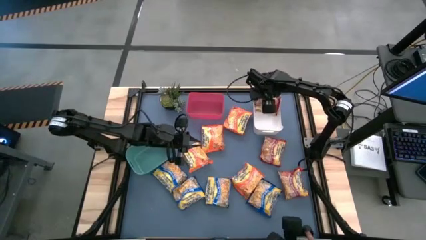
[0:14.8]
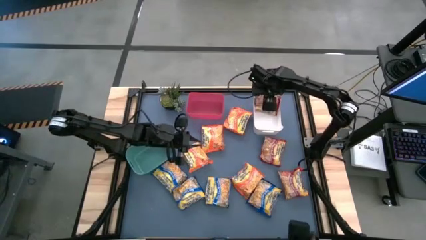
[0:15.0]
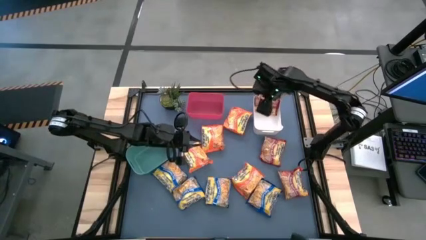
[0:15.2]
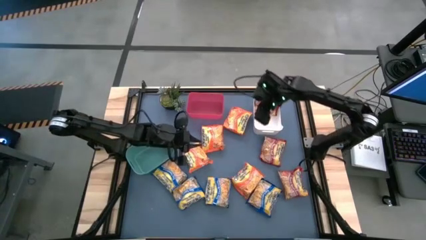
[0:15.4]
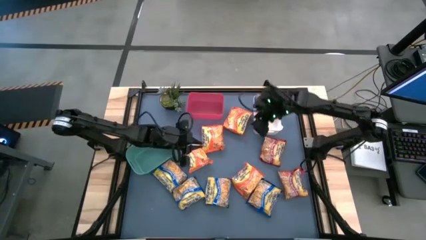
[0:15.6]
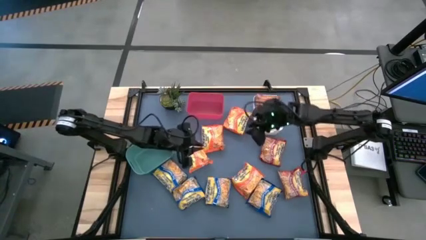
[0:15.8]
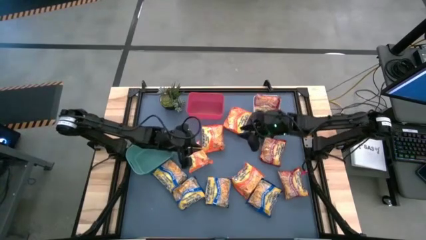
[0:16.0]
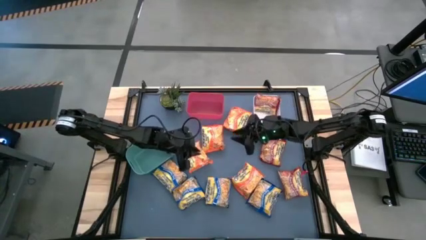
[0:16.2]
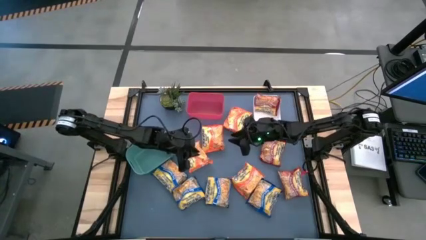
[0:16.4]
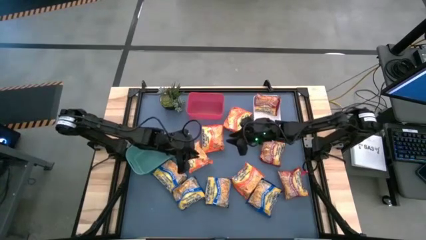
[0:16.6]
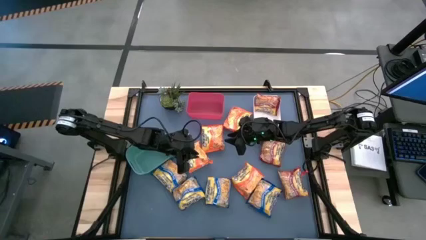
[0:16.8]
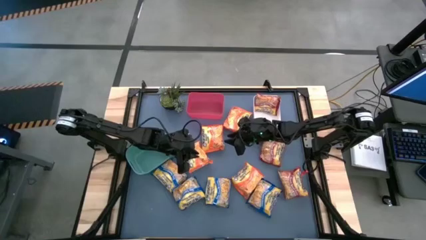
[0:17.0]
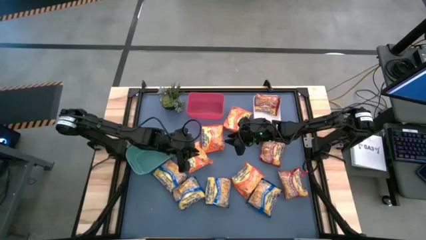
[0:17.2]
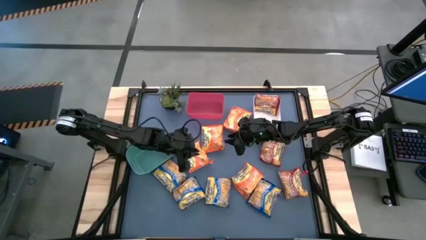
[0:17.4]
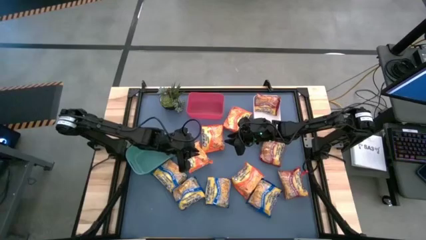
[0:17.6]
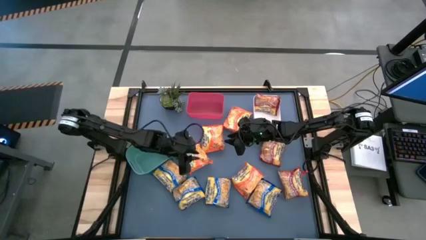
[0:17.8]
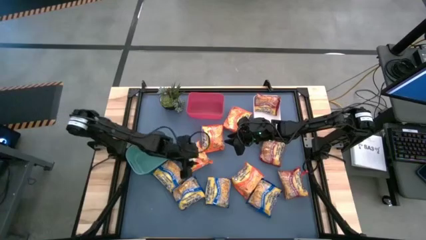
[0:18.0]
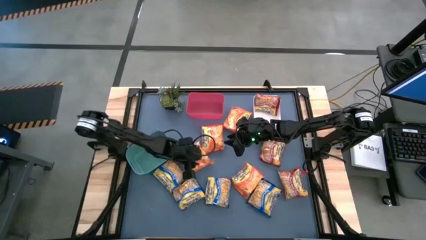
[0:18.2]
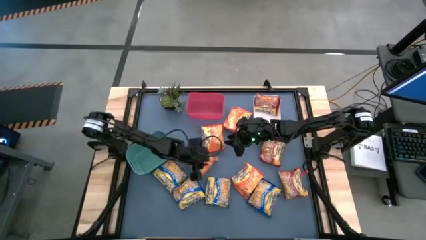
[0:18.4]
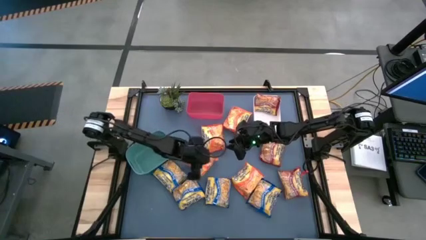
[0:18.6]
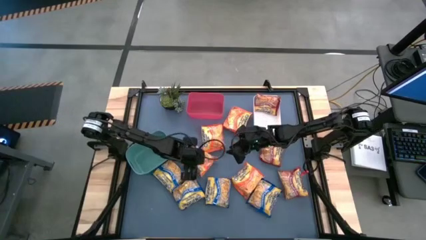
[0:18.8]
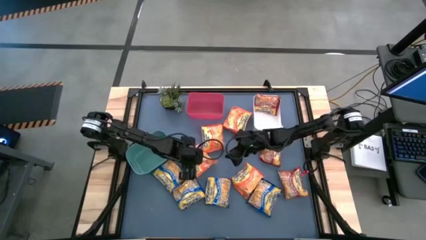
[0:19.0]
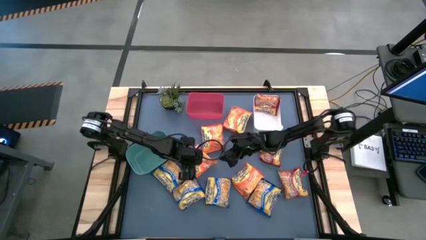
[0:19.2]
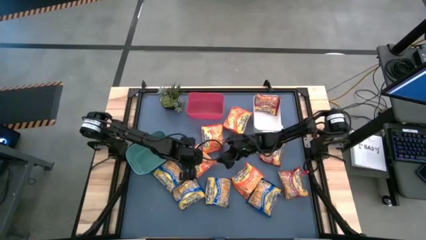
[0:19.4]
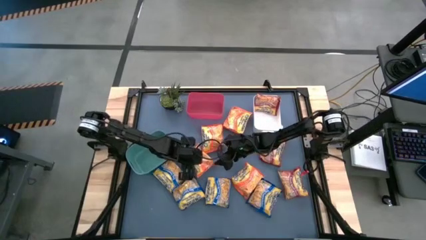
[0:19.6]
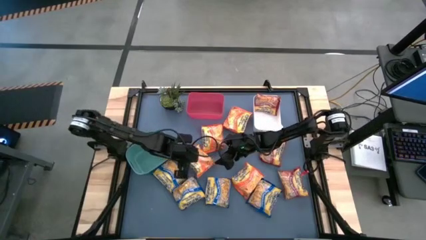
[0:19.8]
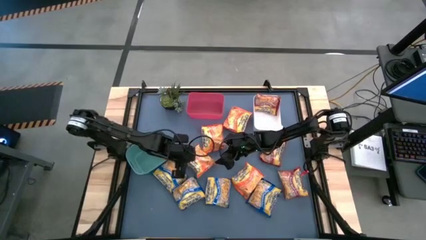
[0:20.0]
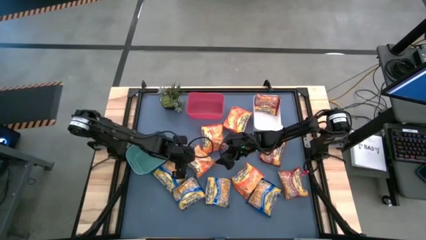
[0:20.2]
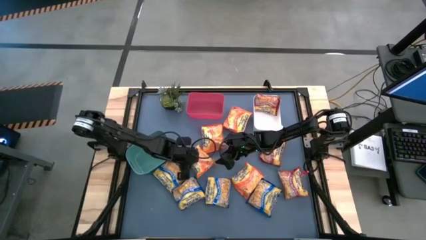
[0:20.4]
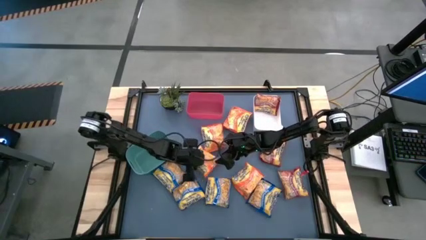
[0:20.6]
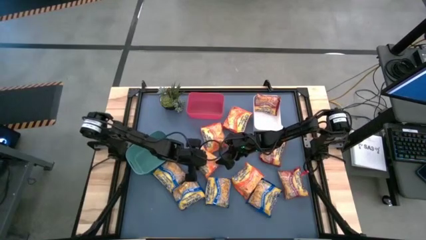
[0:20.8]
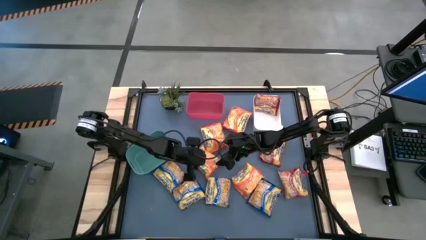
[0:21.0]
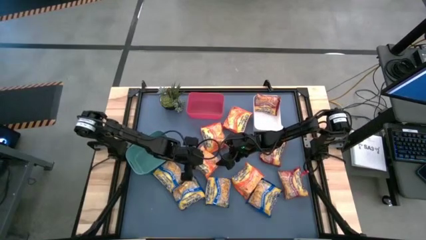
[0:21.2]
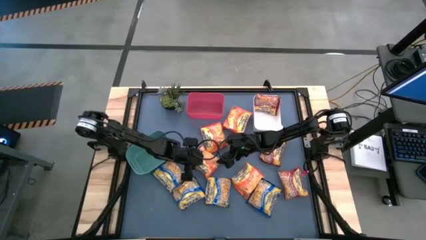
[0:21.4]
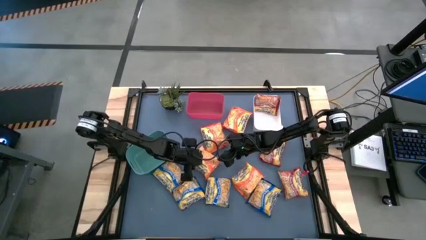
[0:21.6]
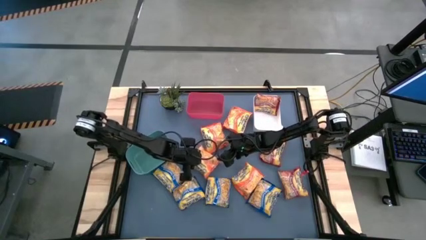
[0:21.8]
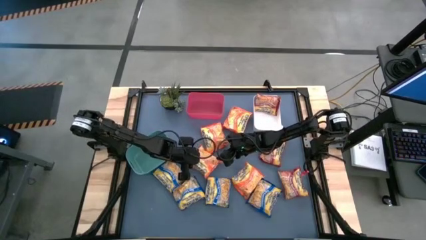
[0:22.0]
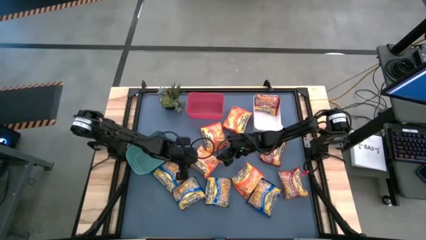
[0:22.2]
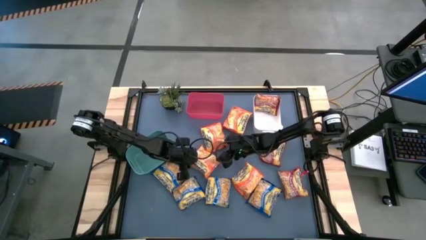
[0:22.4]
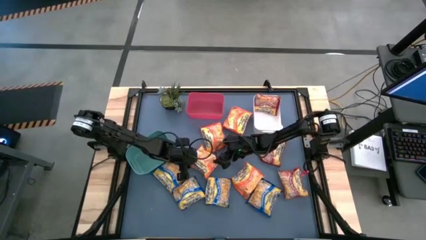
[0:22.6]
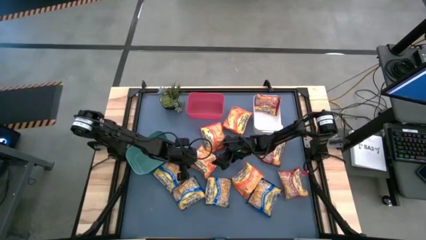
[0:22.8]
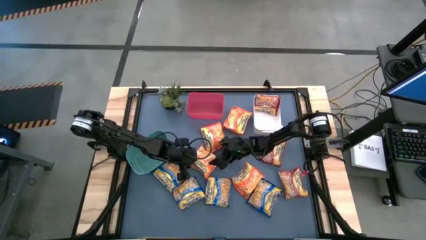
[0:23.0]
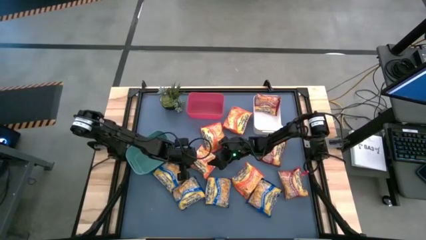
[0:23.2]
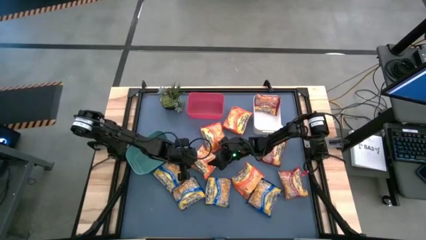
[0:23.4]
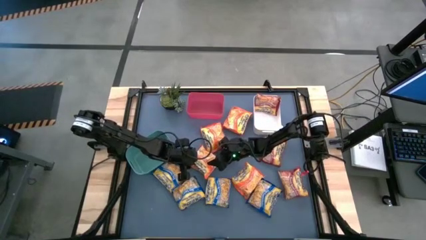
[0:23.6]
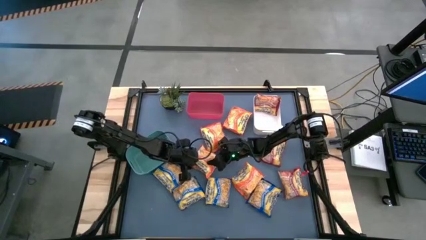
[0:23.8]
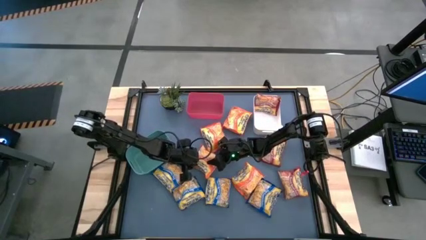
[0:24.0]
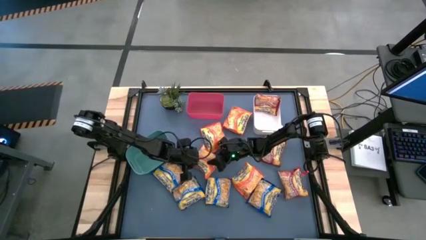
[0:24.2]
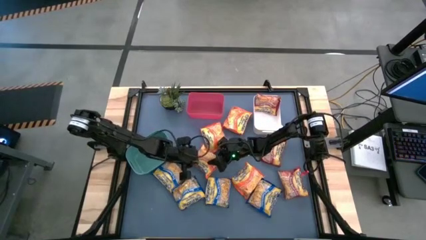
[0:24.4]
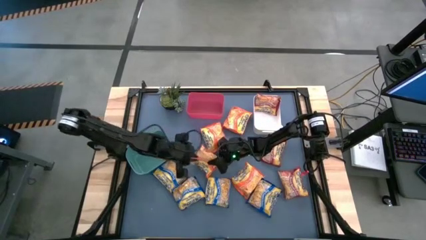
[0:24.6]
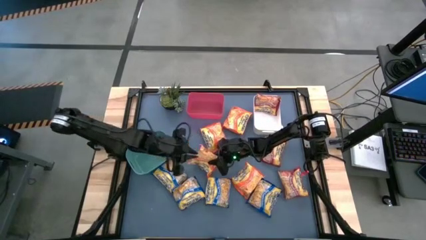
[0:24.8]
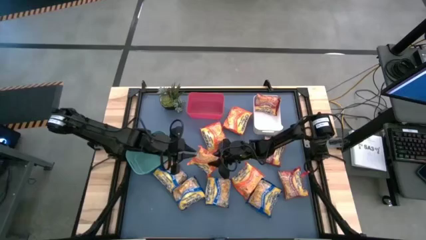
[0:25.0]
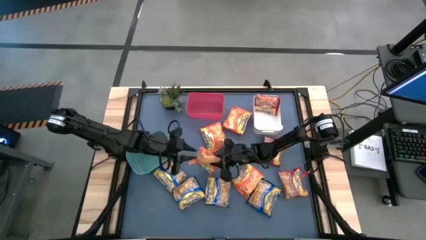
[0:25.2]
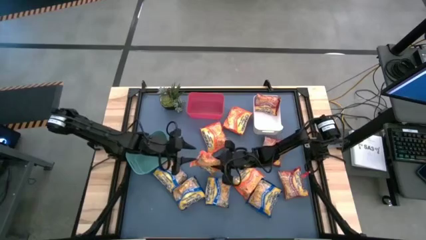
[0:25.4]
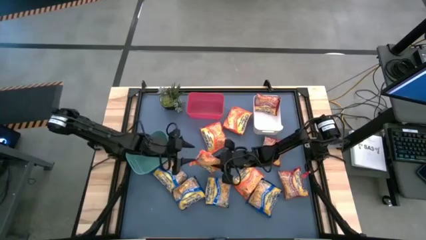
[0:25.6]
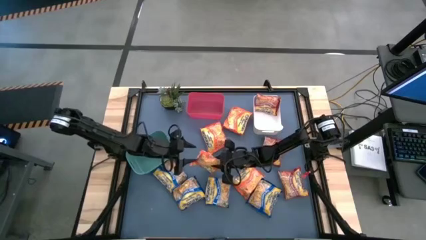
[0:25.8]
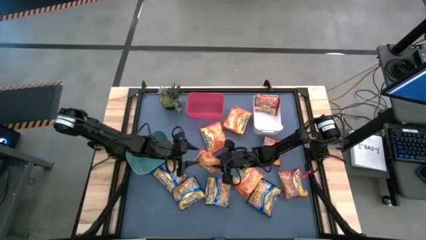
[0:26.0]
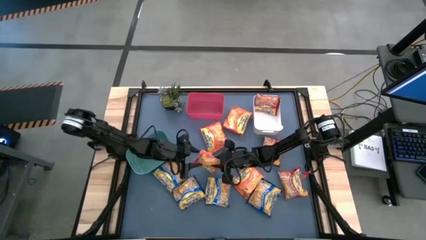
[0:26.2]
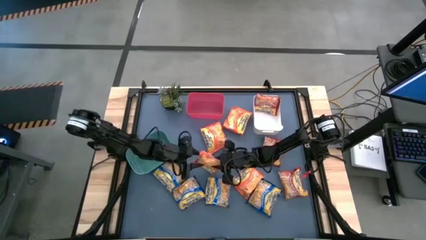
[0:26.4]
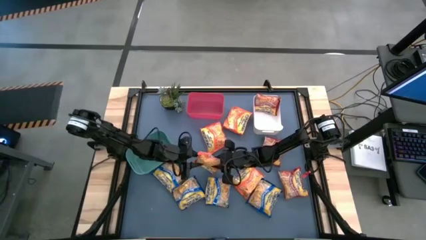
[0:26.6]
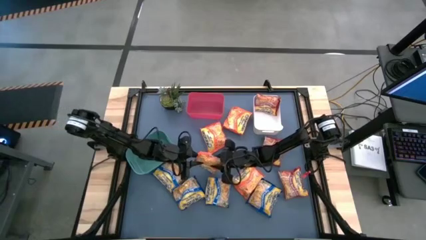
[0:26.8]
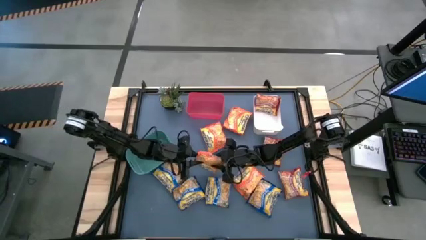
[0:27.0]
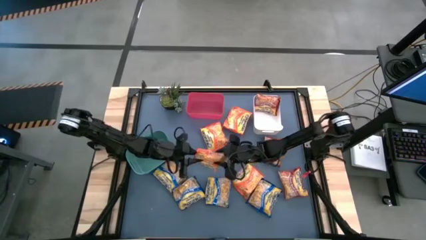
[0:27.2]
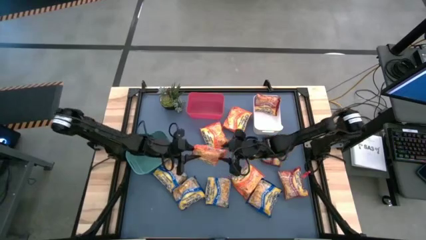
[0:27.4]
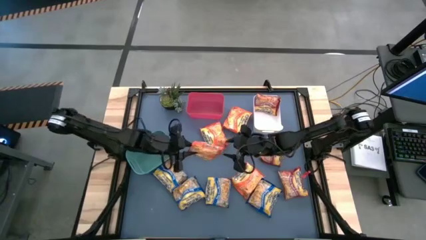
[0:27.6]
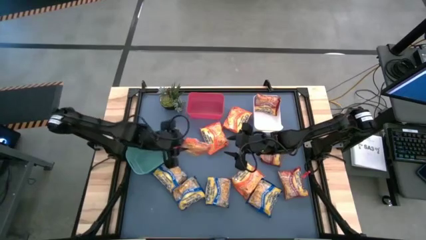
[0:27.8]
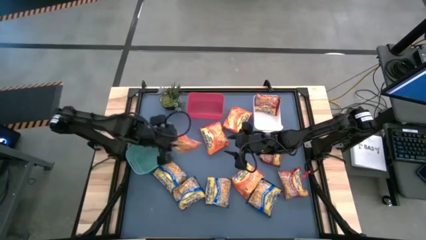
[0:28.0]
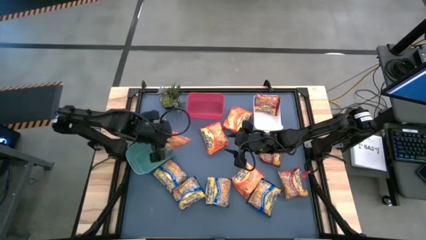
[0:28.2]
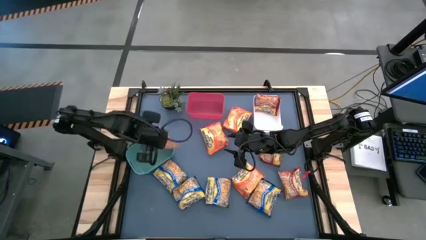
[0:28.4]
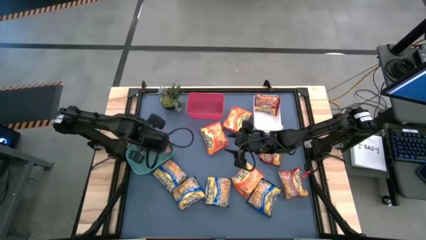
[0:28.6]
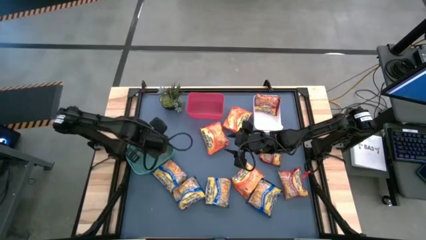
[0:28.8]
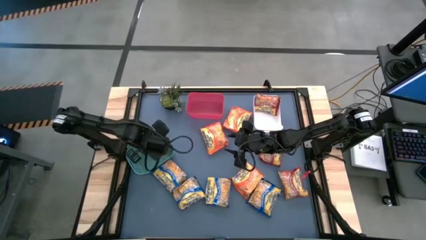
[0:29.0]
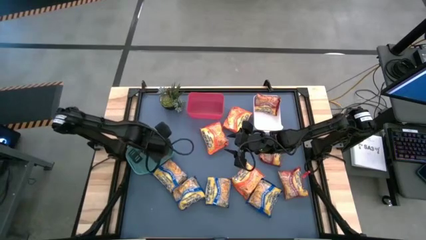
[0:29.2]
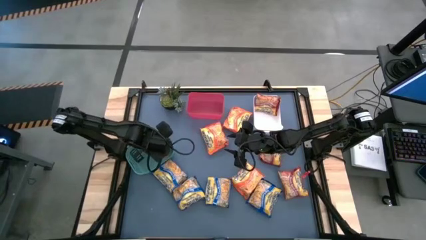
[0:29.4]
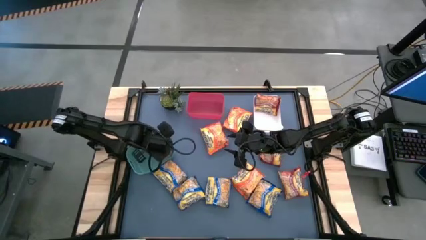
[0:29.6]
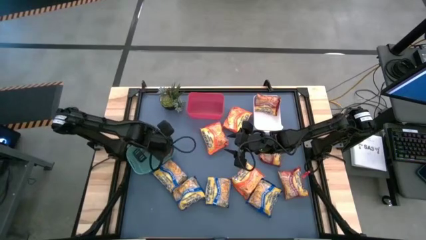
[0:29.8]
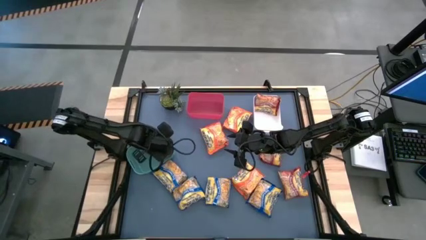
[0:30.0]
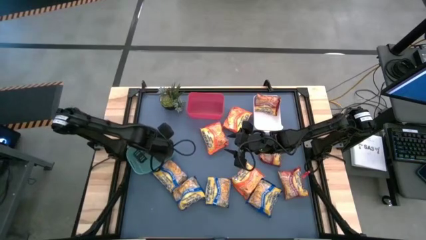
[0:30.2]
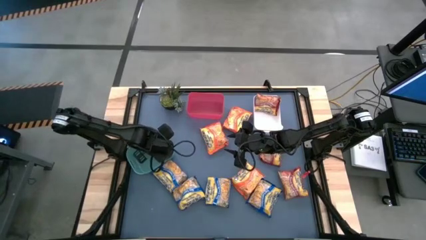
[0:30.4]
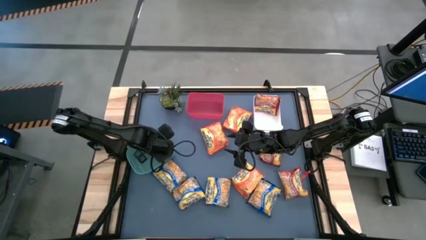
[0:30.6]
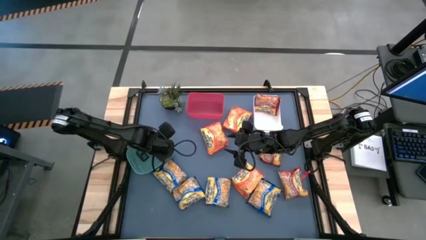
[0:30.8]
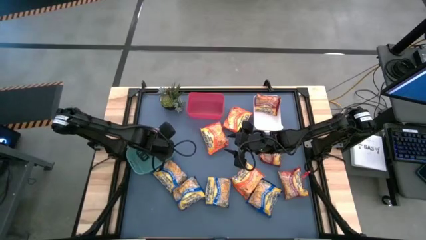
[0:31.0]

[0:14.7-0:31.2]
Task: Sort Maruchan noodles
Put the orange noodle pack into the green bin
